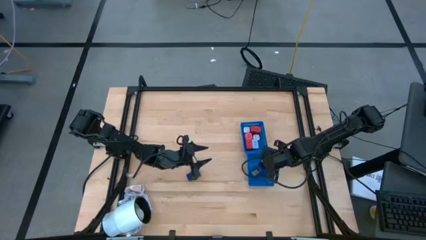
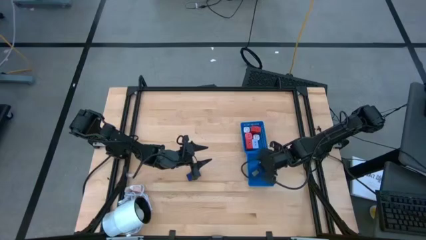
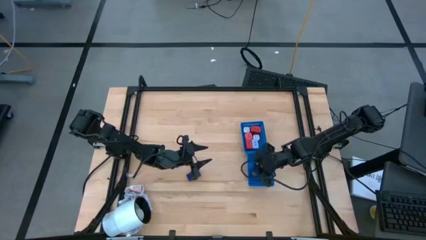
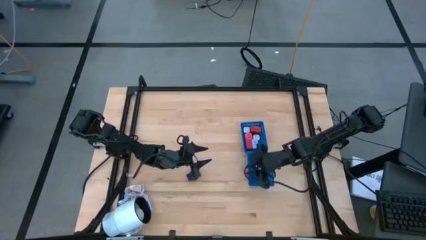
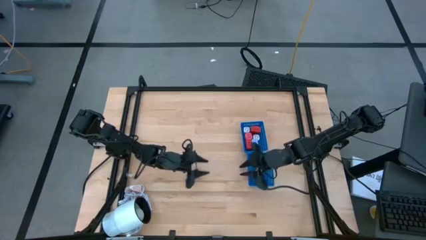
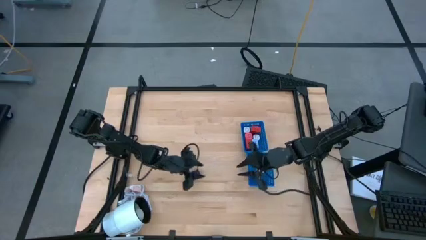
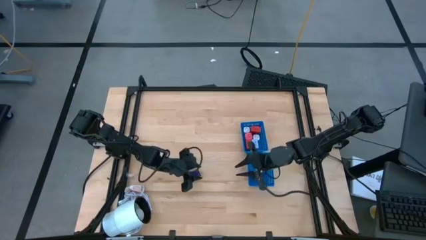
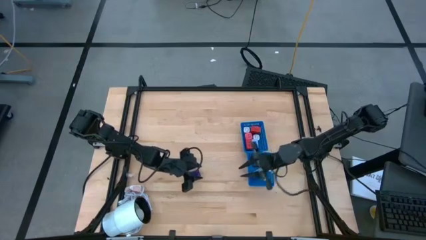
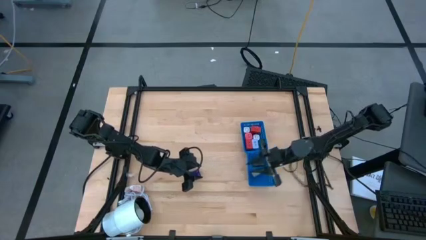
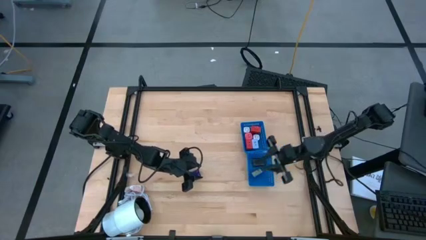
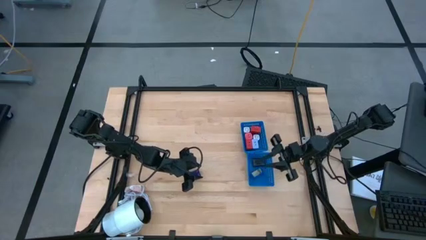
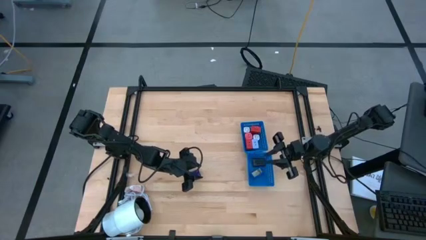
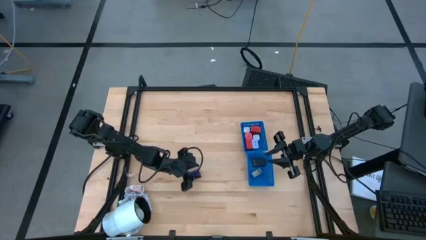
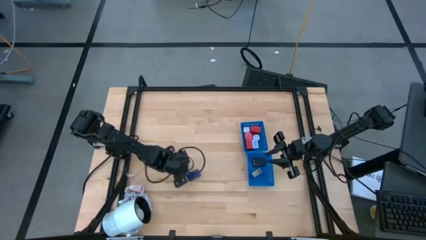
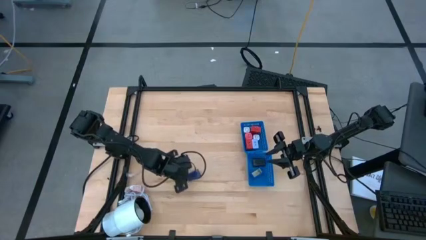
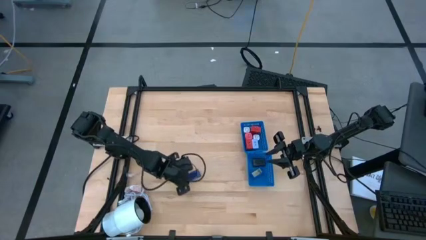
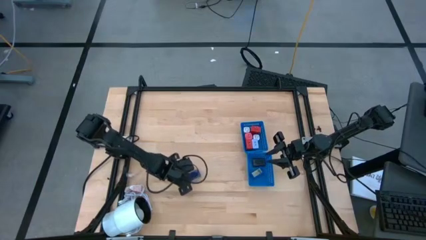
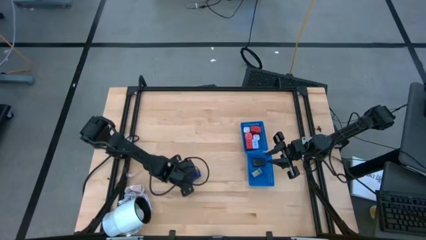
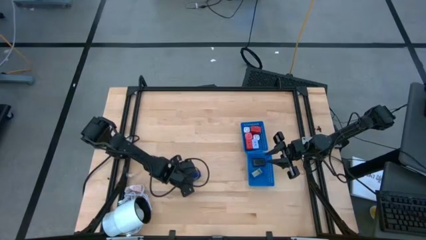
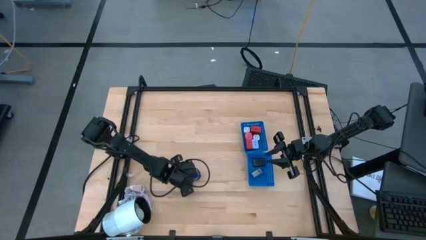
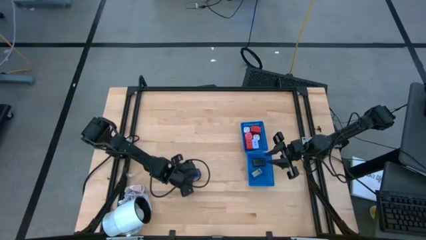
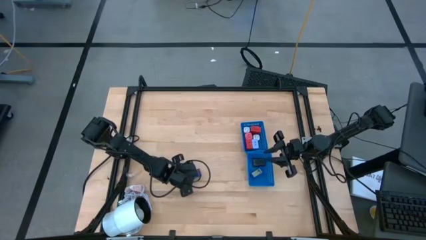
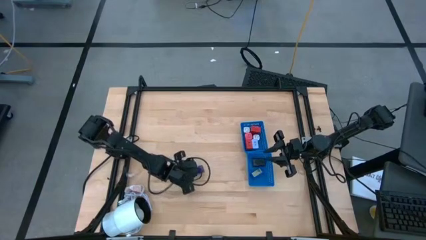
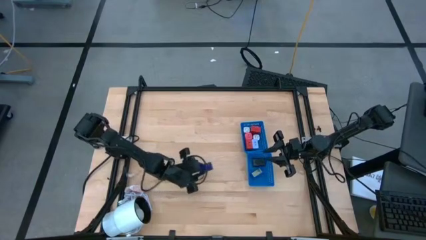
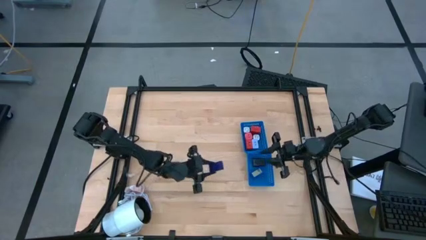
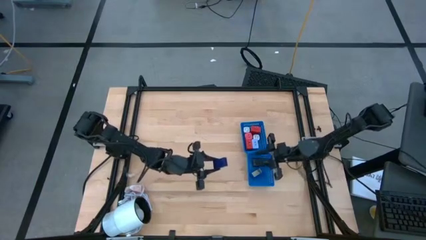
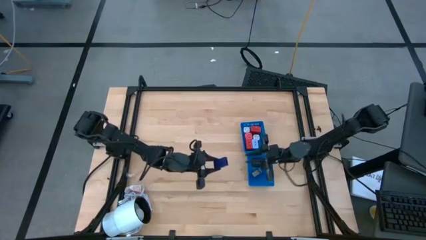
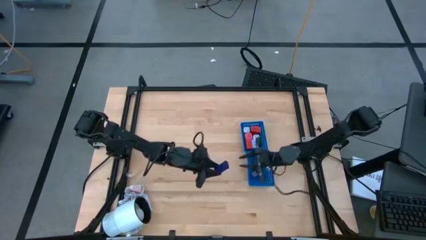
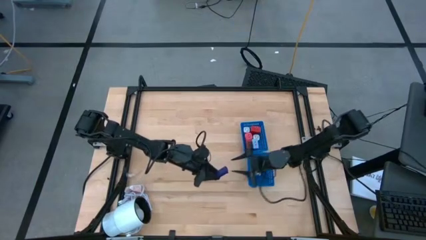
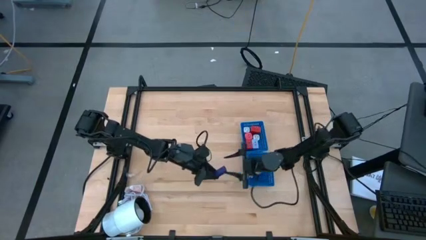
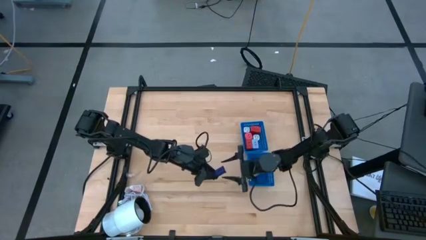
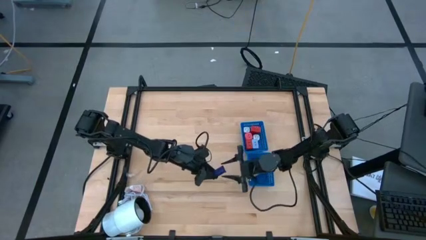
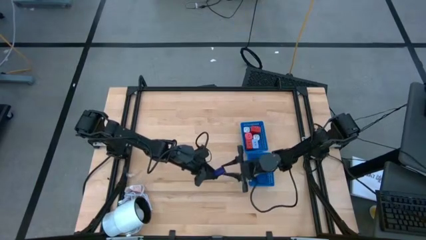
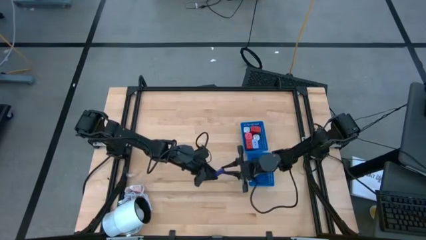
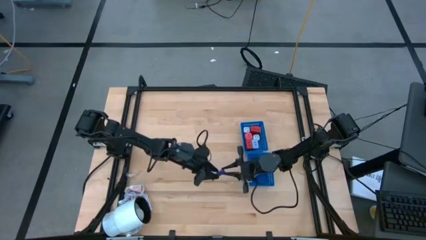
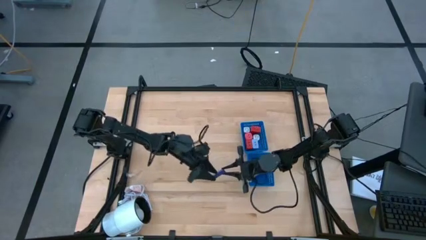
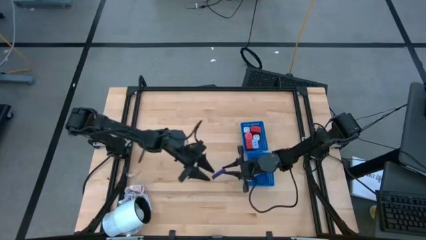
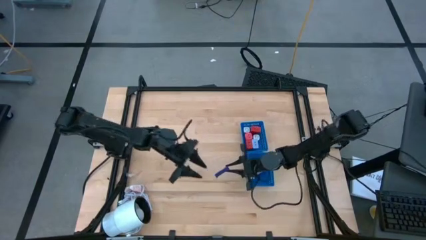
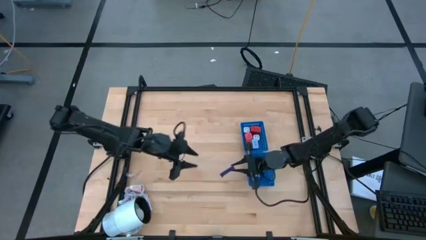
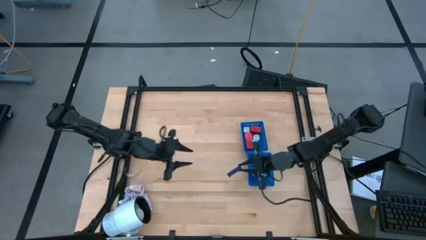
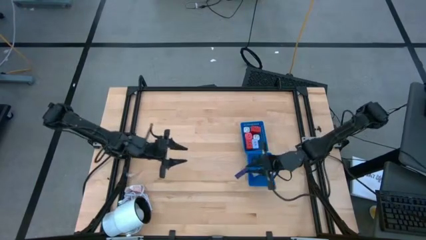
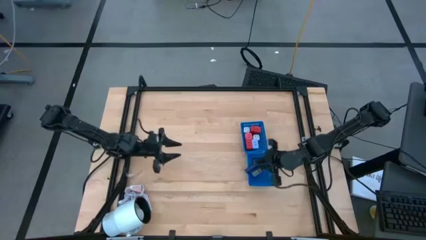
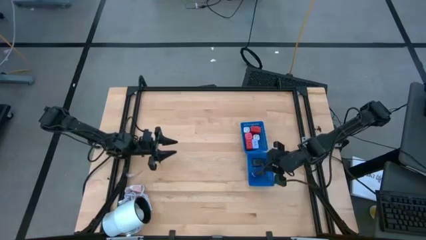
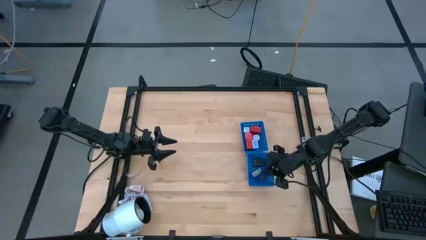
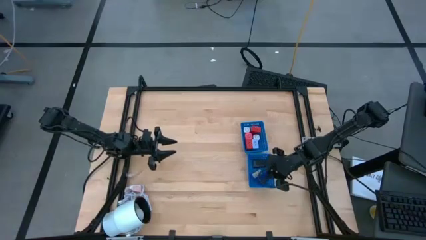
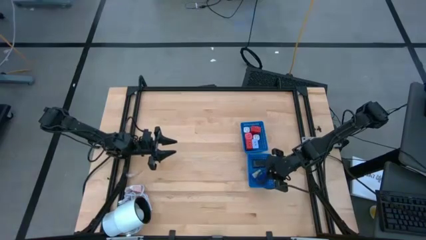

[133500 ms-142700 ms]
Task: Pick & Place Office items
Put the dark blue digital timer into the bottom blue bin

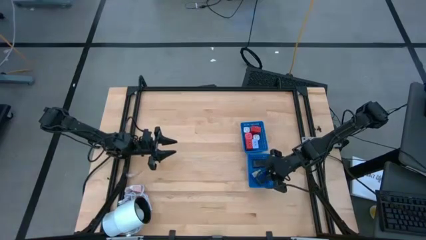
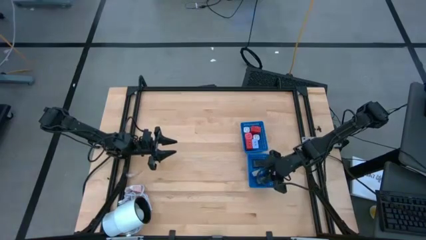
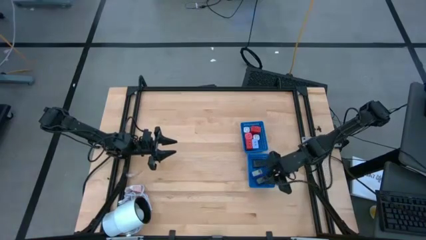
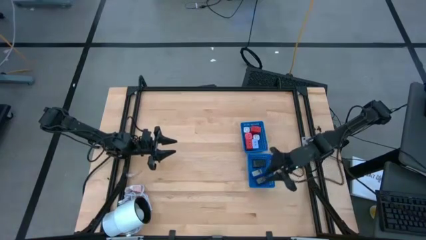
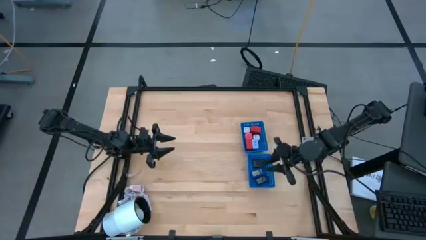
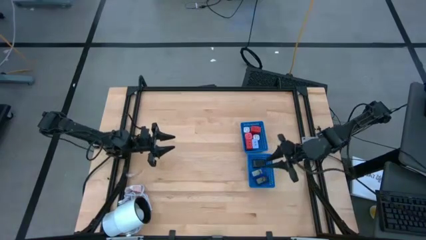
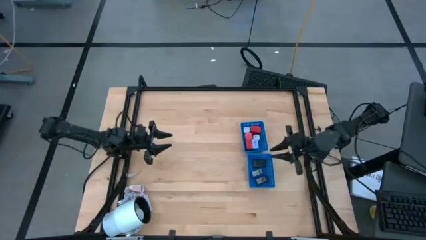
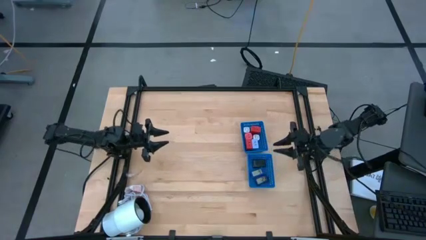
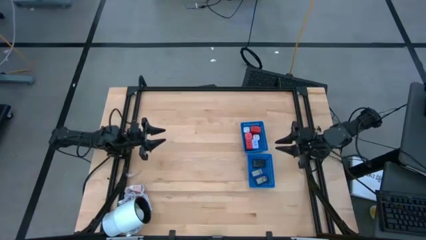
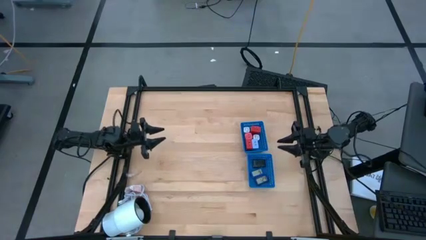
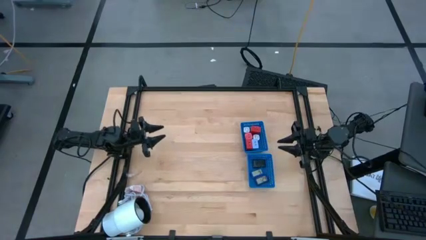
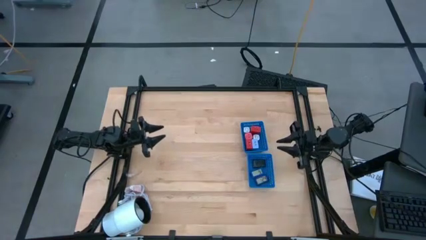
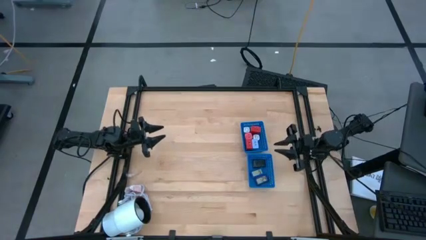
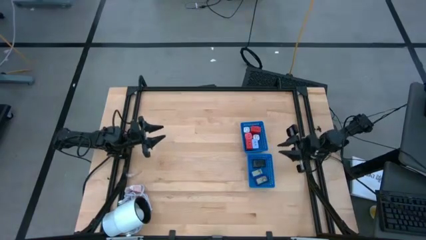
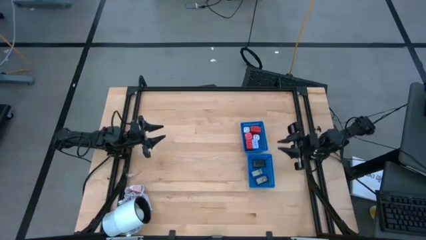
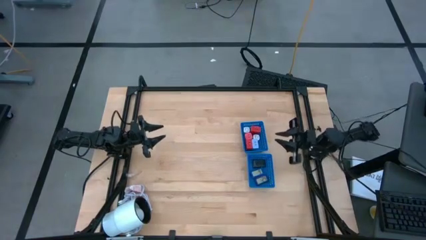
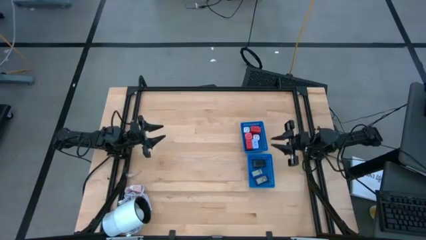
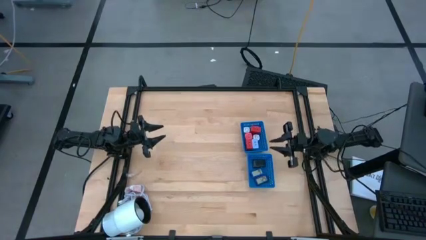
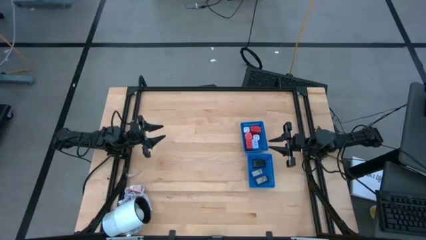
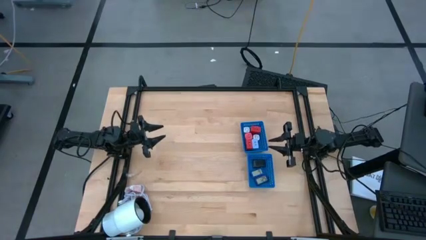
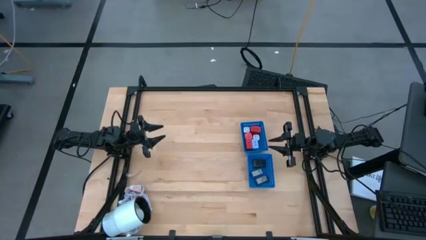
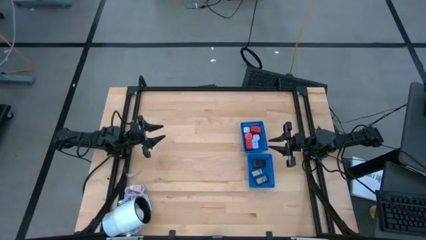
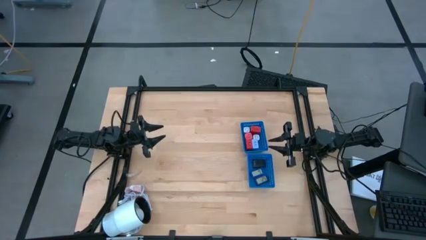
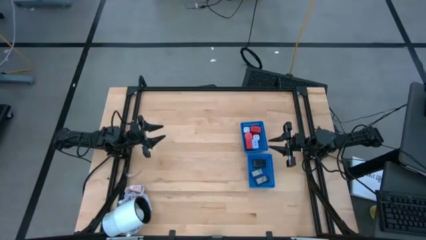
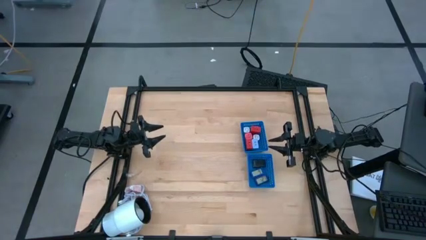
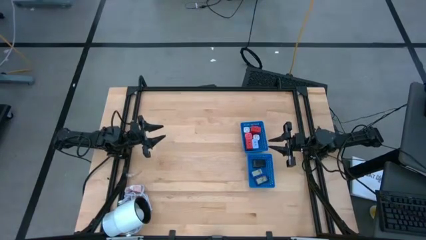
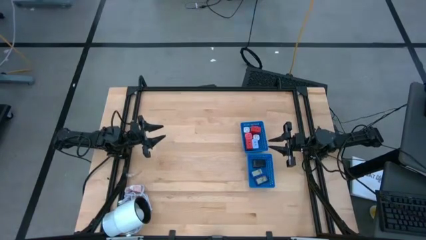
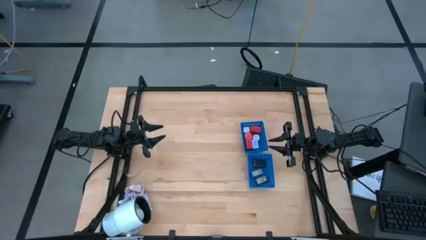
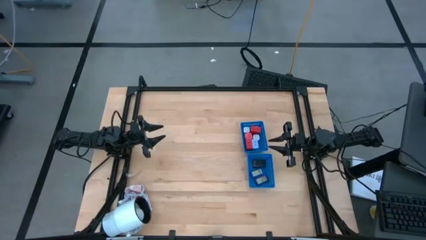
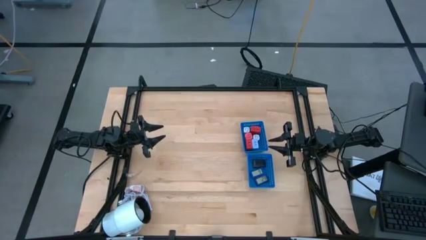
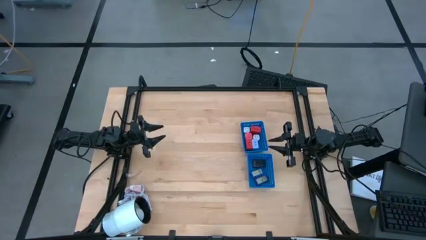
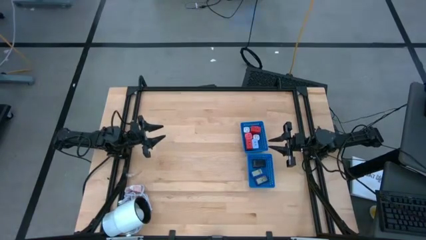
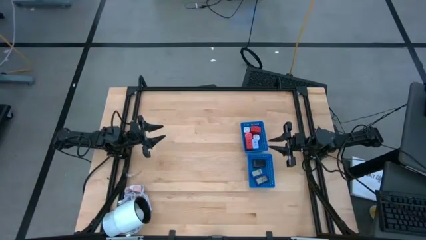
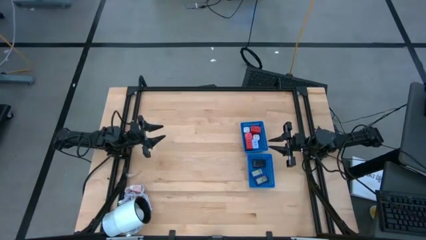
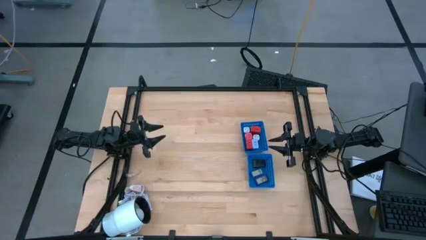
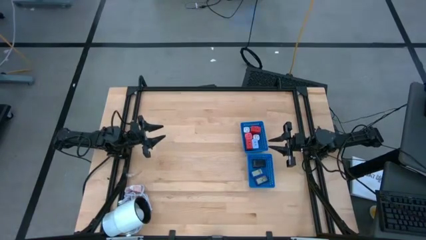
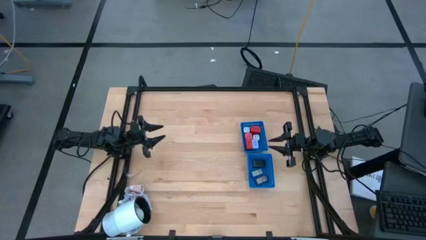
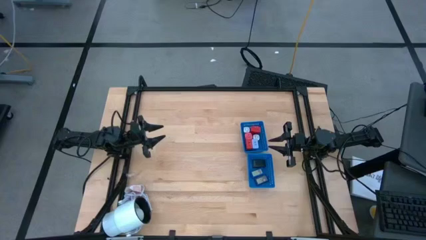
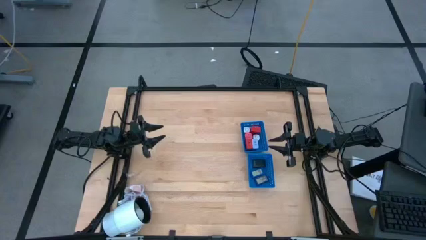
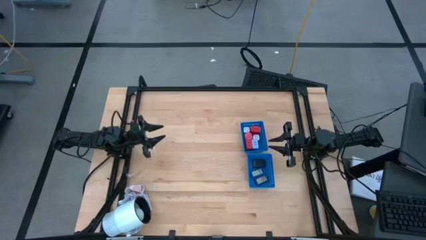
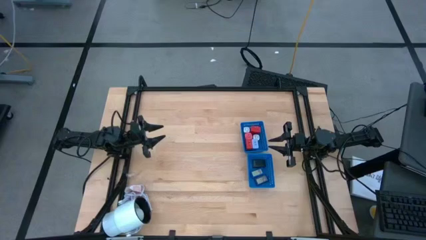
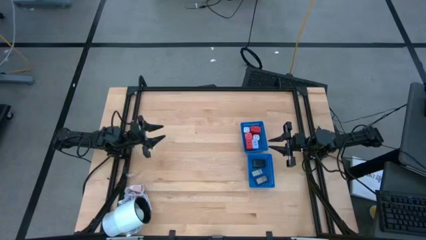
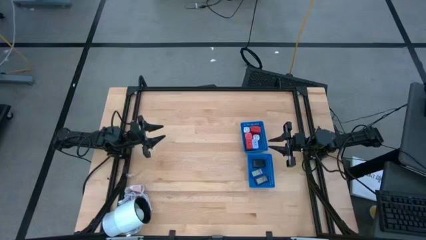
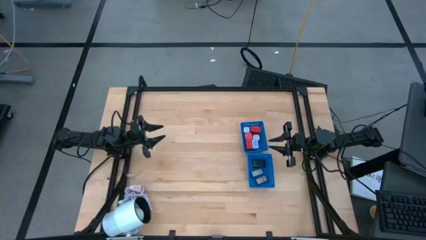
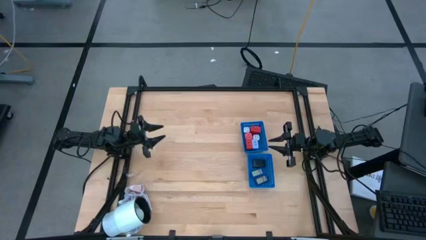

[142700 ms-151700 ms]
Return to Home Position
